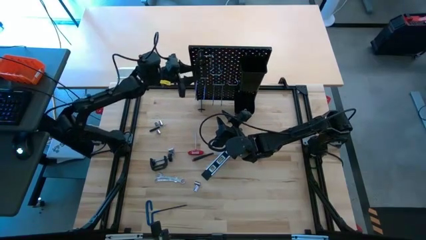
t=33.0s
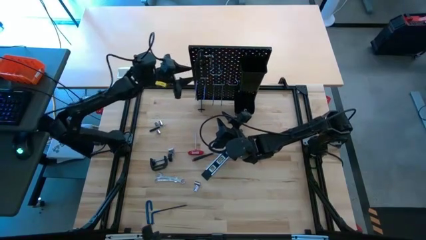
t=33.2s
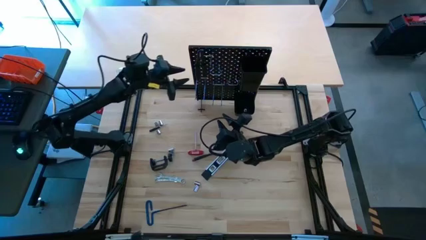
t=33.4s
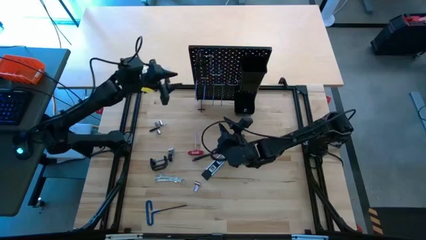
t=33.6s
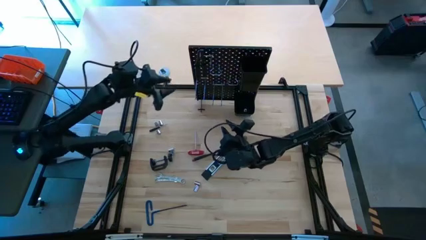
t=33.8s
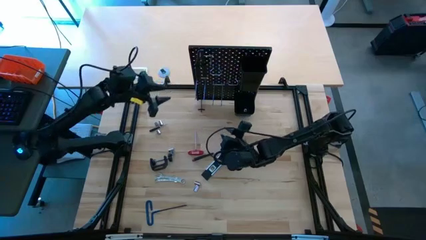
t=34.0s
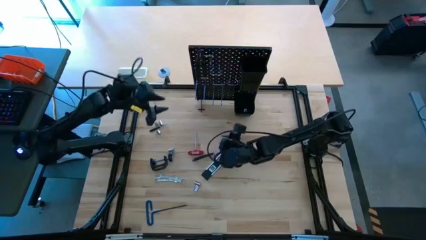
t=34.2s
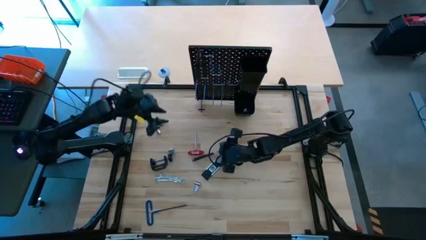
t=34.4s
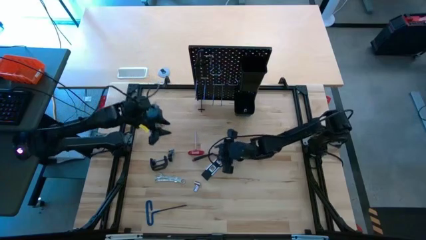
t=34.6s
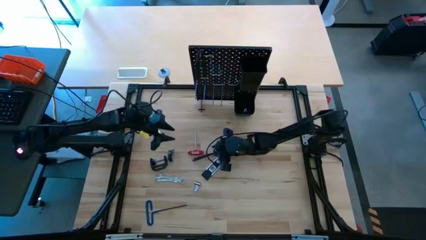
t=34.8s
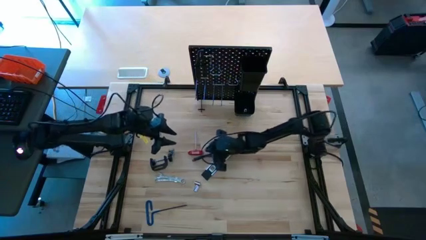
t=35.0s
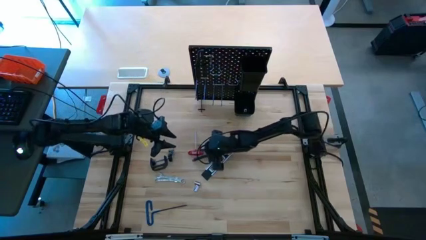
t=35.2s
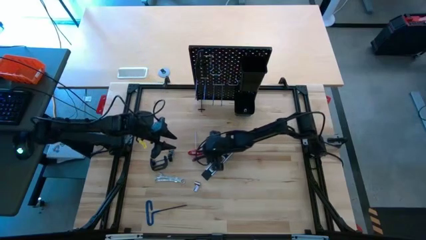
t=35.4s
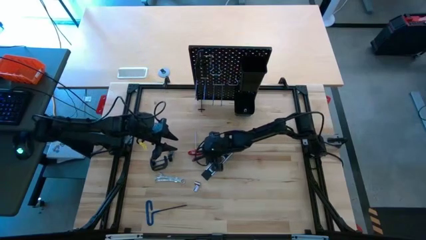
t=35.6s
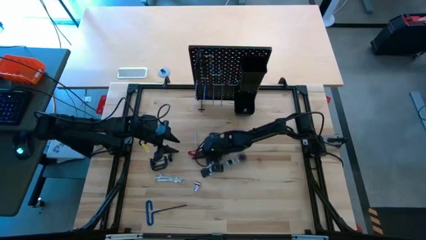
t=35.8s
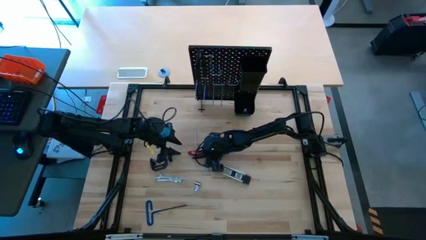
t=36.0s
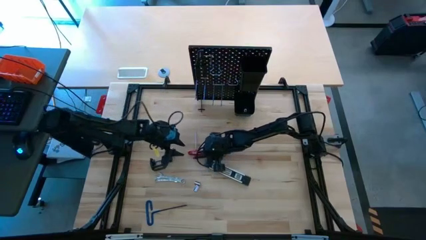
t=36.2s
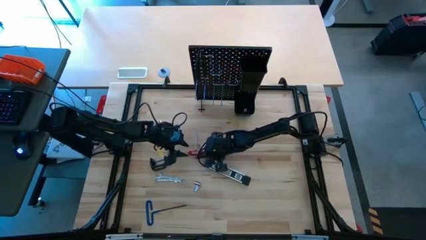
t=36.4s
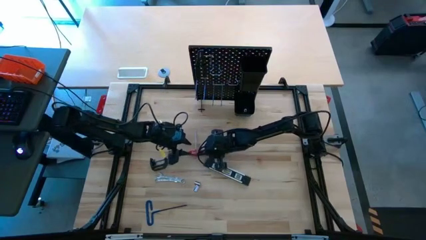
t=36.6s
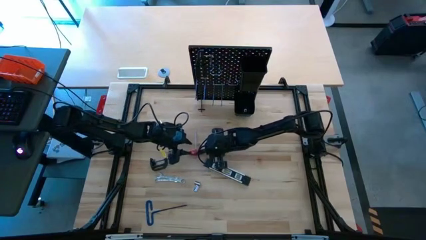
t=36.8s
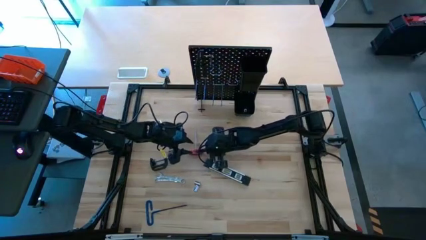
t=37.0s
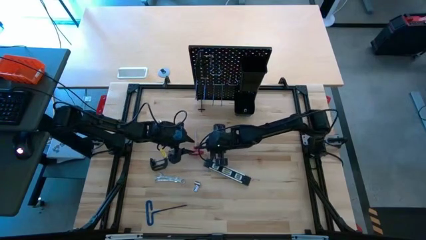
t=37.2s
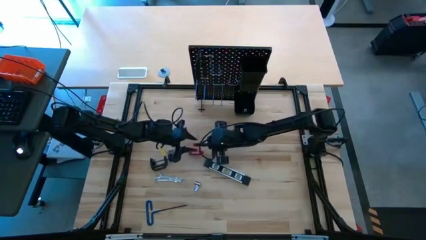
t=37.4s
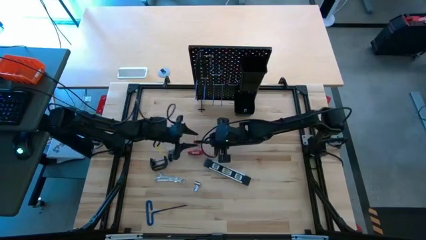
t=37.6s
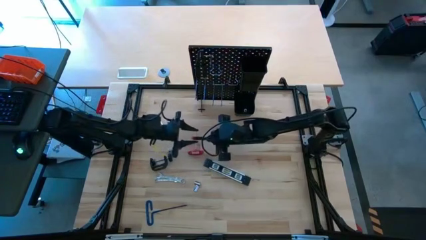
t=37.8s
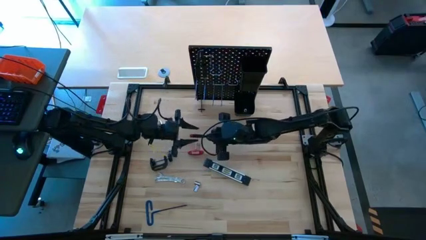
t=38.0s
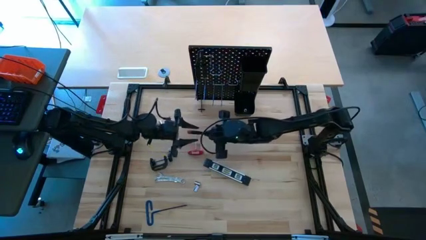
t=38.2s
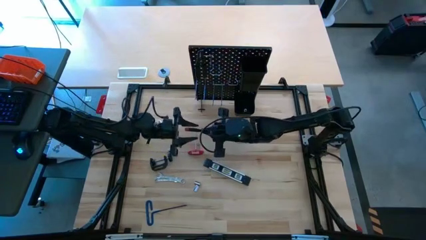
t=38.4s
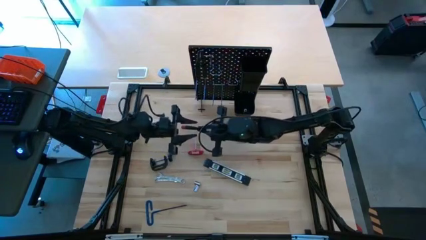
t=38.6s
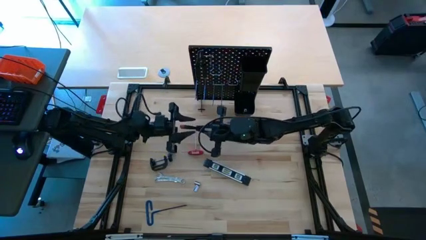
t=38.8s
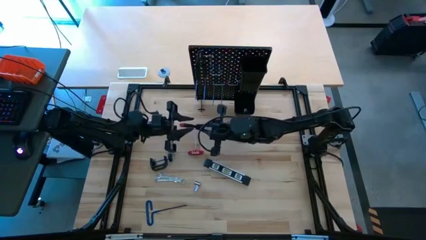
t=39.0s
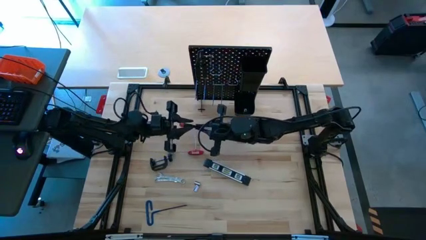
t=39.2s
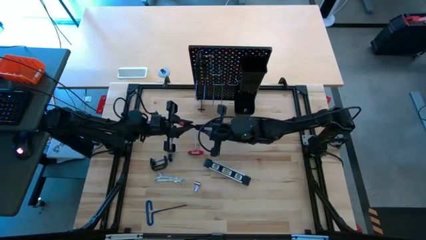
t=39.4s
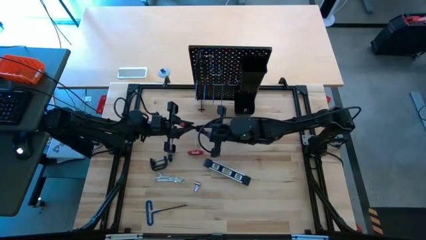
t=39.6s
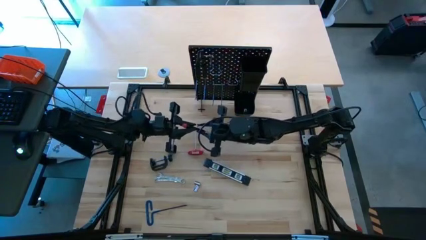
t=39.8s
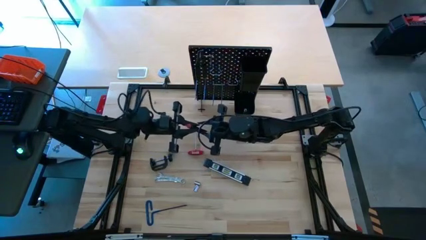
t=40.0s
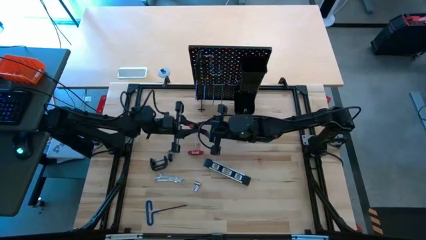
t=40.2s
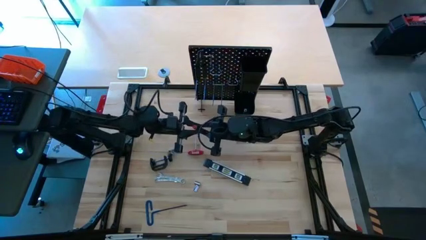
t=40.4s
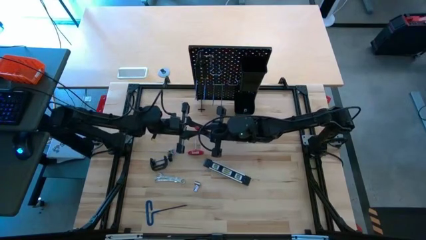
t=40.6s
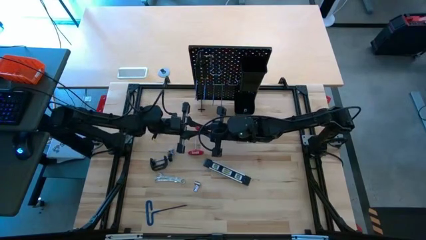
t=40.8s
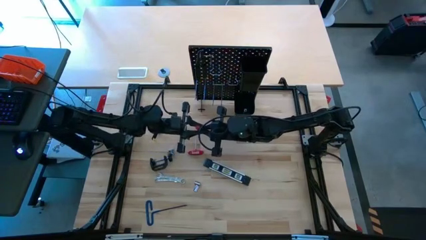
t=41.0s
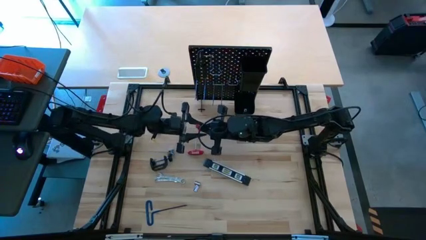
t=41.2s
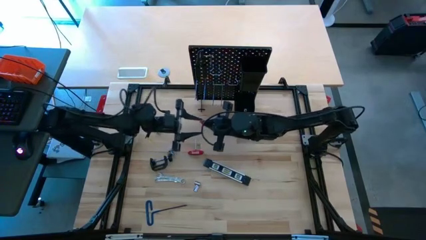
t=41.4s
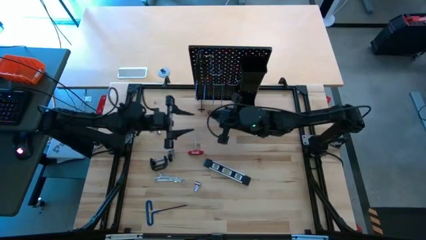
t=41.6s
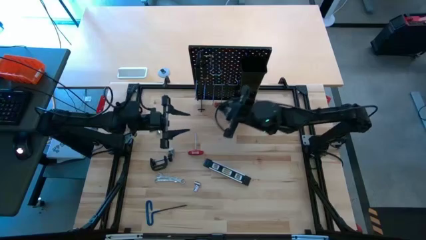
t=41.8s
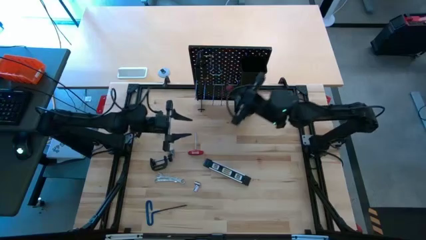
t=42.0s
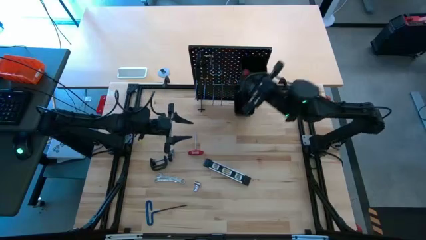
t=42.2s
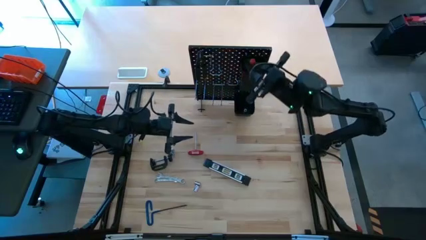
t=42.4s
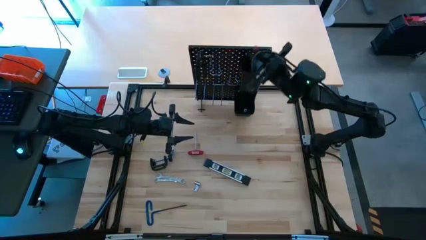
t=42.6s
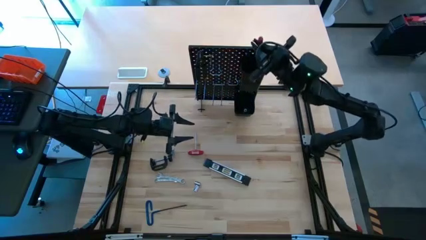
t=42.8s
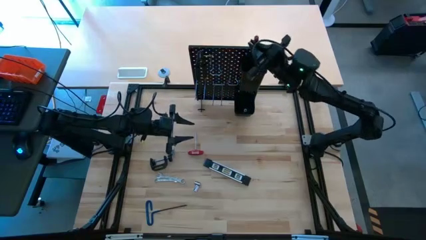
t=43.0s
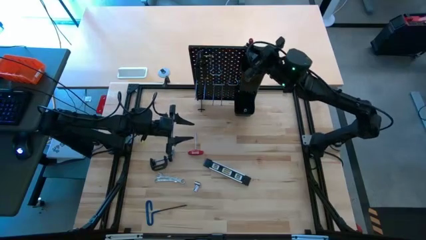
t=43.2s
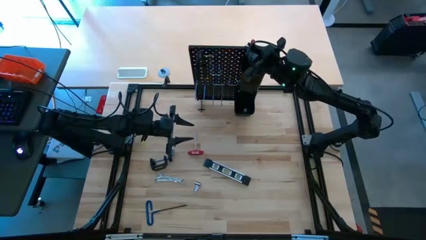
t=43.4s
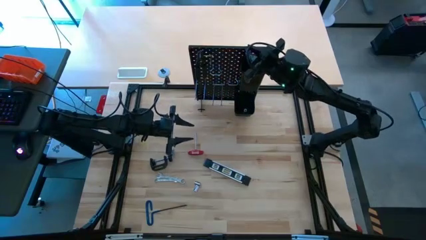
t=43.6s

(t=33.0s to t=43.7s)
Task: Hang tools onto peg board
Put the nut driver into the top black bin on the peg board

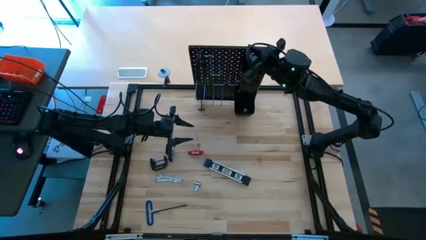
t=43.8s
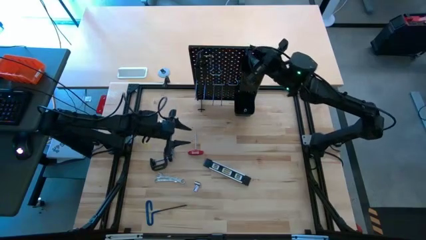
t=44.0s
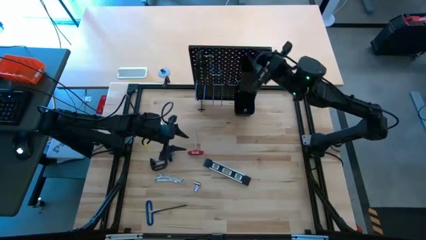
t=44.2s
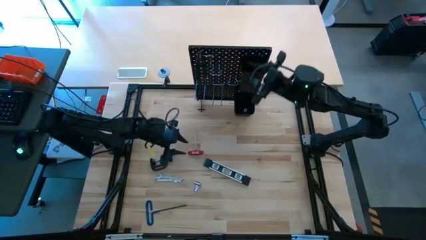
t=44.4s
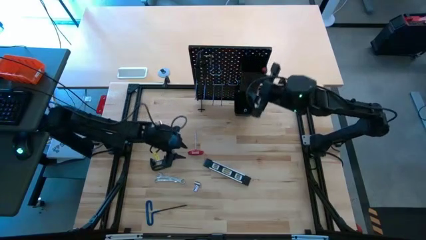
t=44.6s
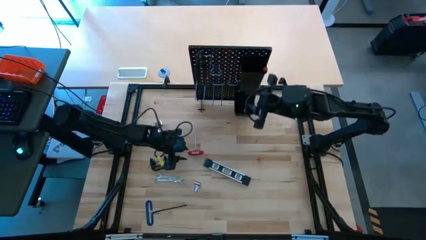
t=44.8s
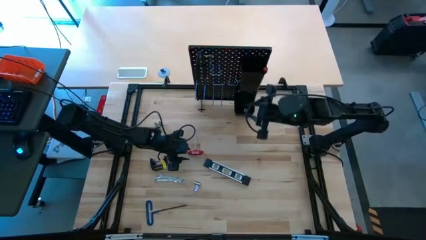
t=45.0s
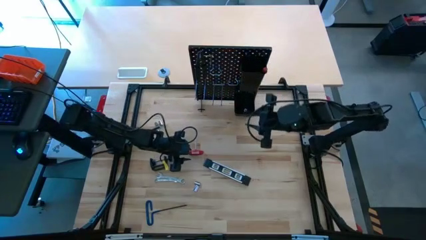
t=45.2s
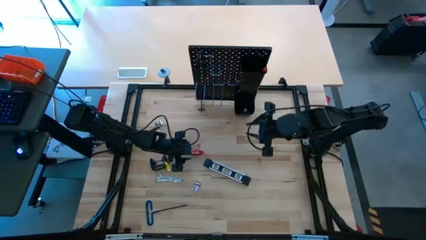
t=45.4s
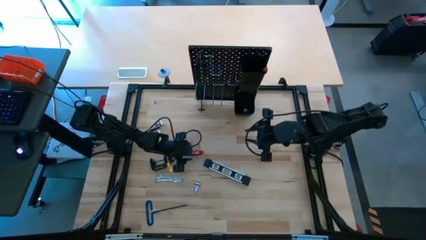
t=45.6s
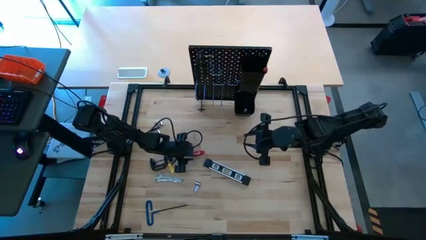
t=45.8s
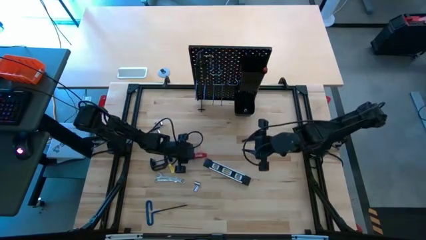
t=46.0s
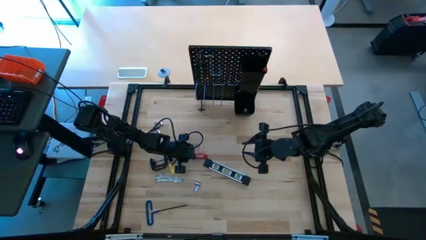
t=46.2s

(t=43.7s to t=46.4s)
Hang the allen wrench on the peg board
